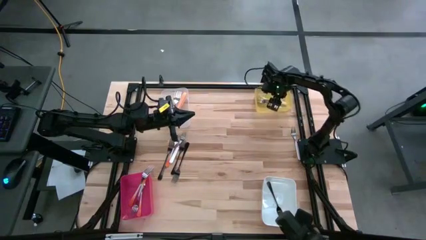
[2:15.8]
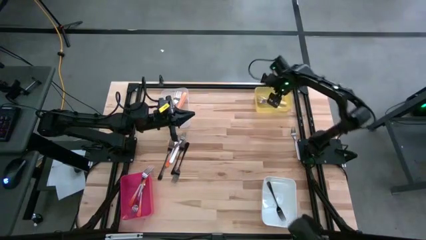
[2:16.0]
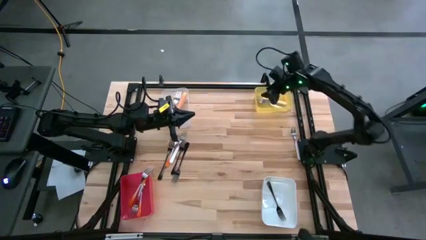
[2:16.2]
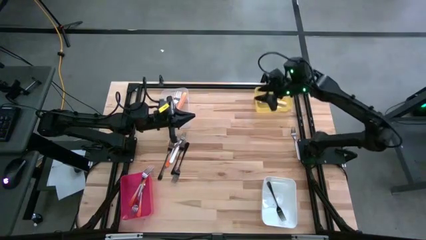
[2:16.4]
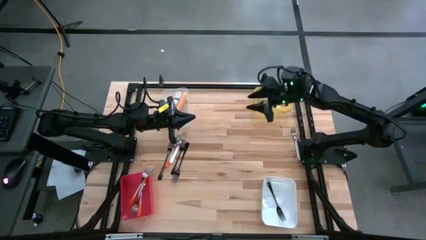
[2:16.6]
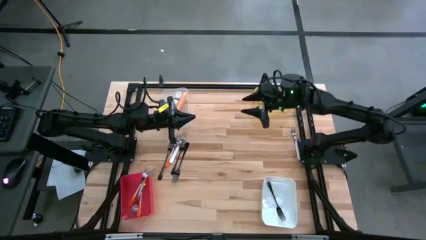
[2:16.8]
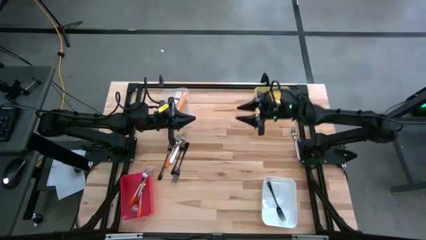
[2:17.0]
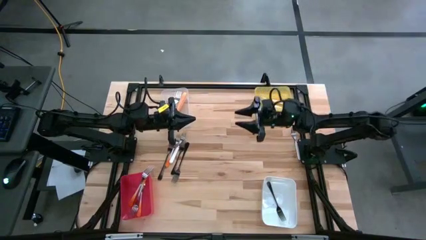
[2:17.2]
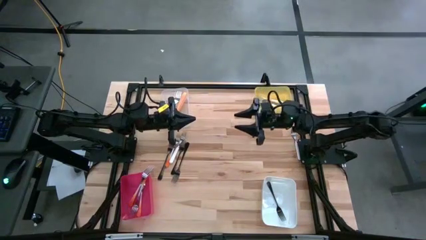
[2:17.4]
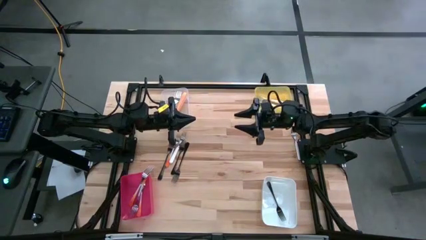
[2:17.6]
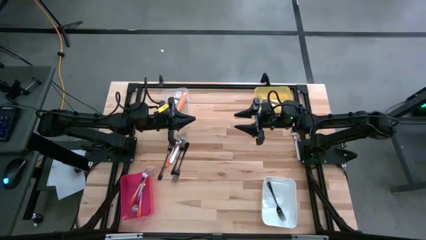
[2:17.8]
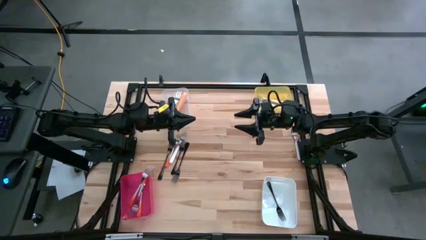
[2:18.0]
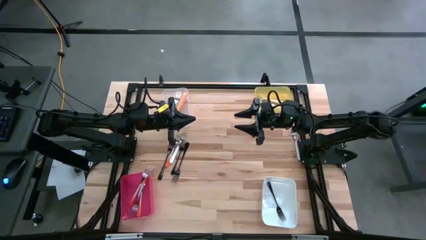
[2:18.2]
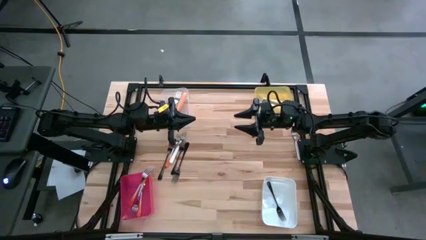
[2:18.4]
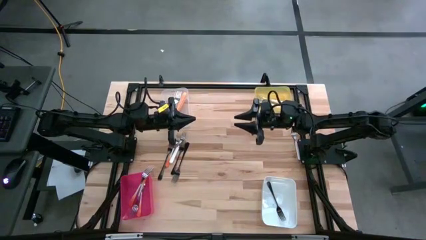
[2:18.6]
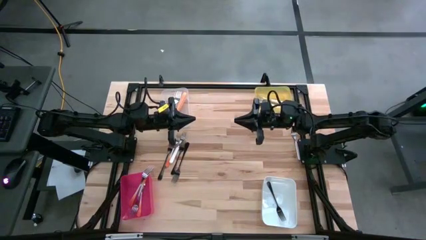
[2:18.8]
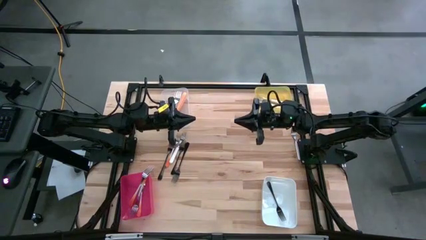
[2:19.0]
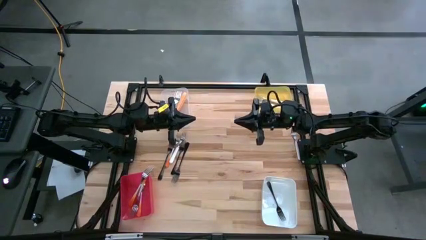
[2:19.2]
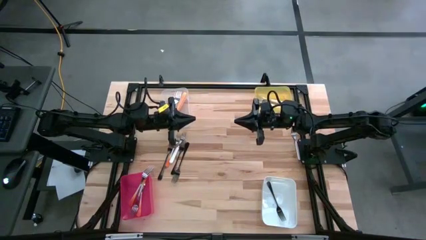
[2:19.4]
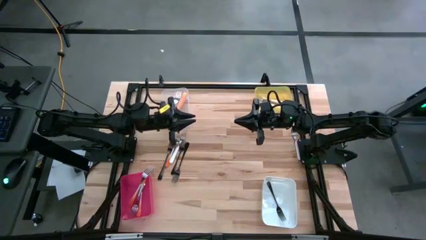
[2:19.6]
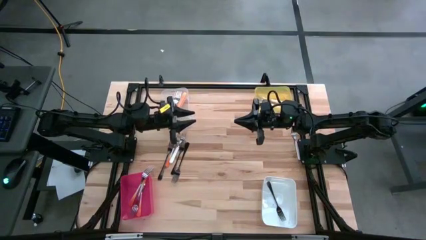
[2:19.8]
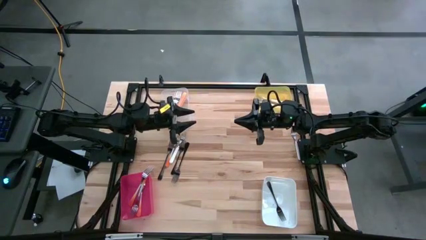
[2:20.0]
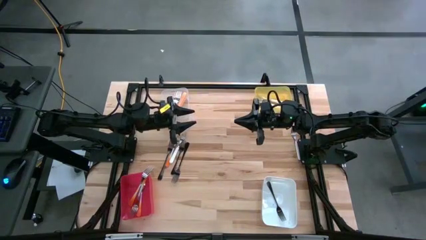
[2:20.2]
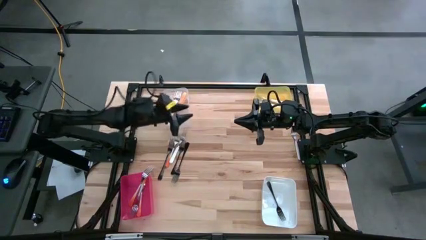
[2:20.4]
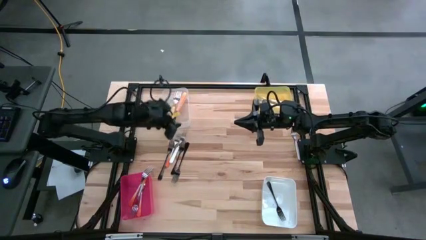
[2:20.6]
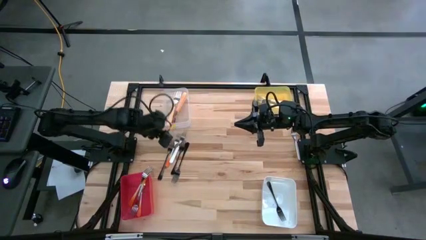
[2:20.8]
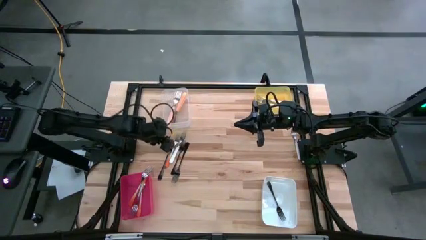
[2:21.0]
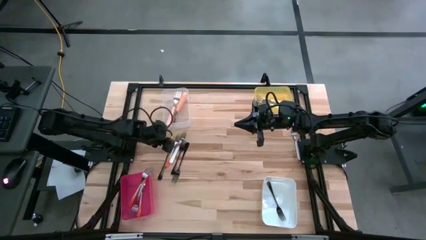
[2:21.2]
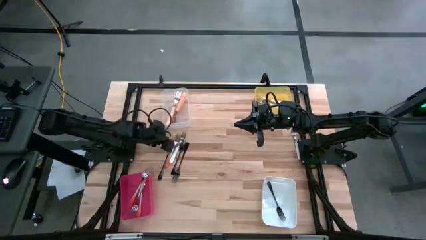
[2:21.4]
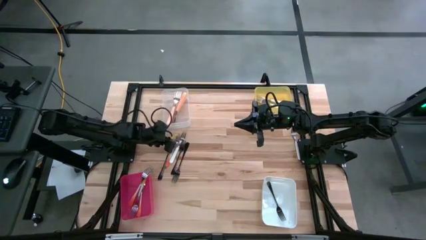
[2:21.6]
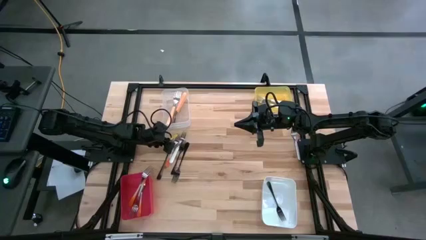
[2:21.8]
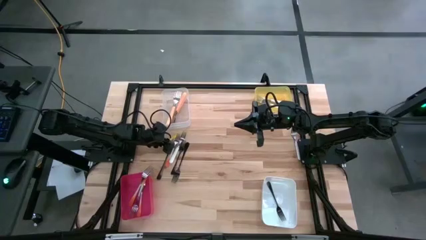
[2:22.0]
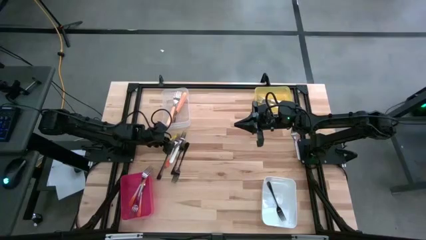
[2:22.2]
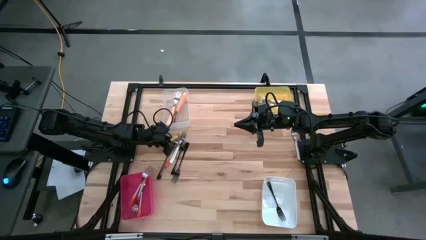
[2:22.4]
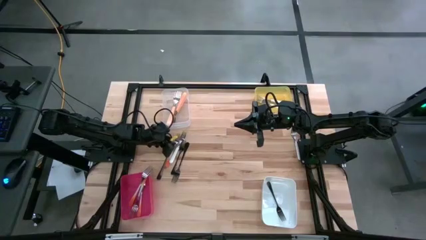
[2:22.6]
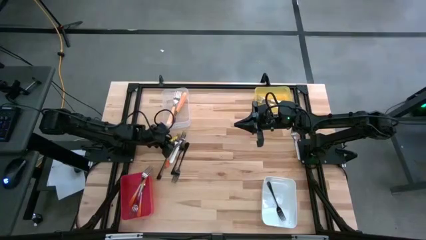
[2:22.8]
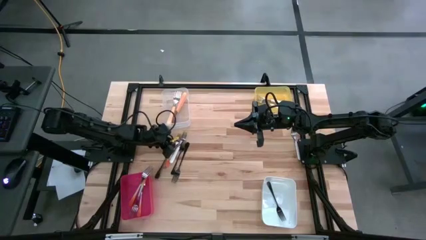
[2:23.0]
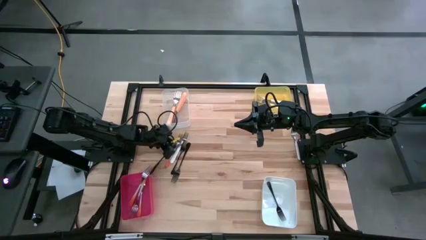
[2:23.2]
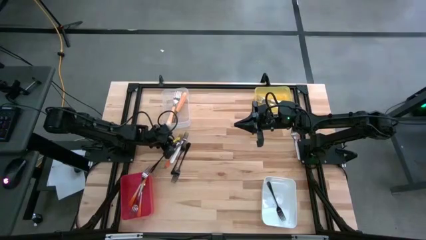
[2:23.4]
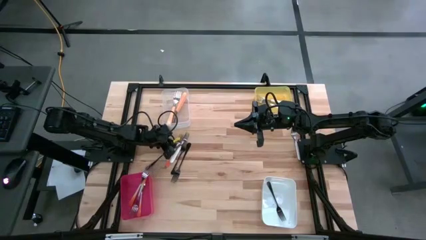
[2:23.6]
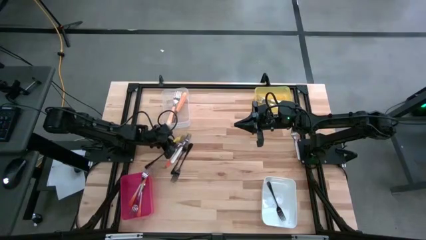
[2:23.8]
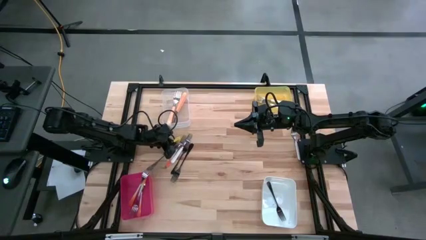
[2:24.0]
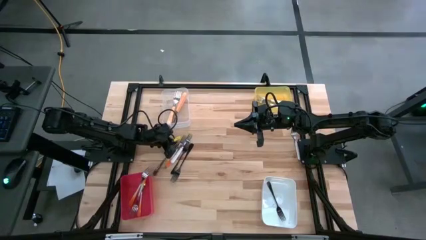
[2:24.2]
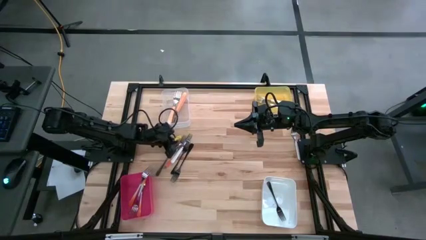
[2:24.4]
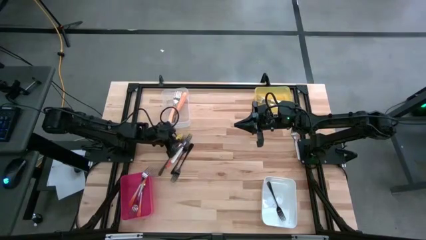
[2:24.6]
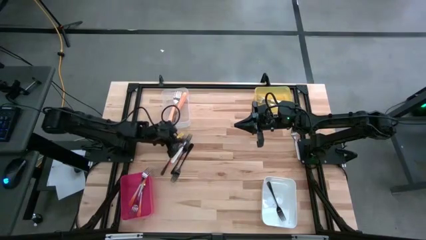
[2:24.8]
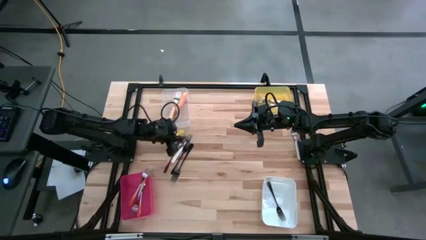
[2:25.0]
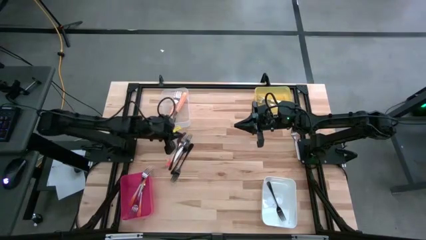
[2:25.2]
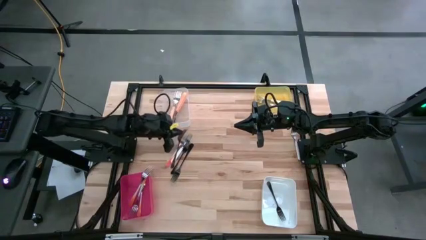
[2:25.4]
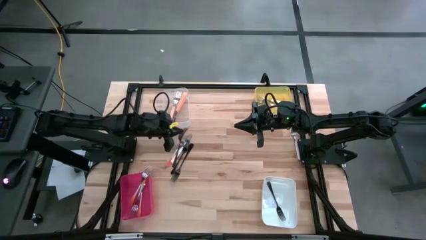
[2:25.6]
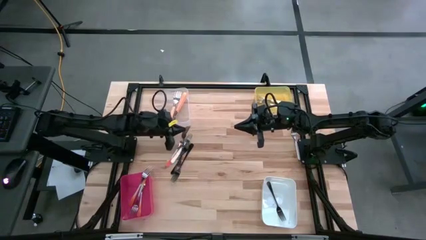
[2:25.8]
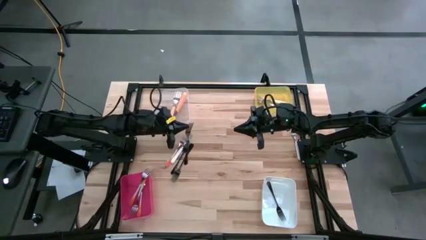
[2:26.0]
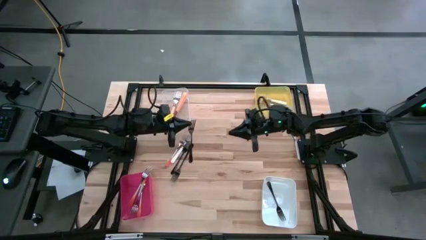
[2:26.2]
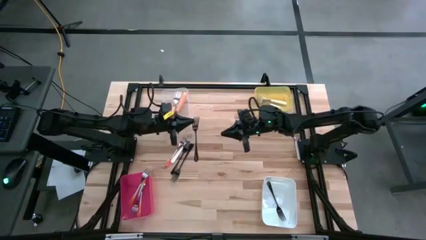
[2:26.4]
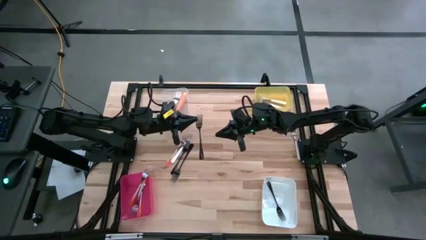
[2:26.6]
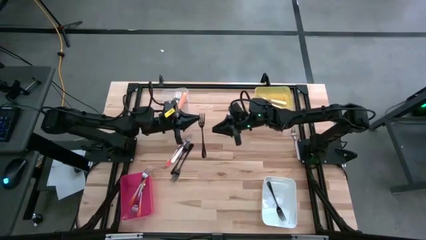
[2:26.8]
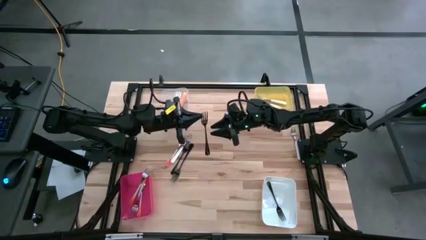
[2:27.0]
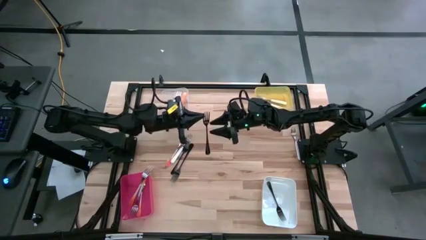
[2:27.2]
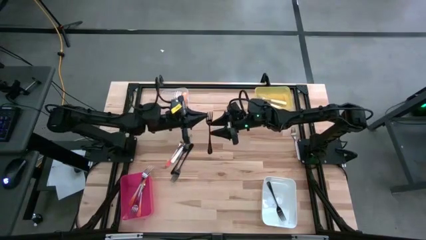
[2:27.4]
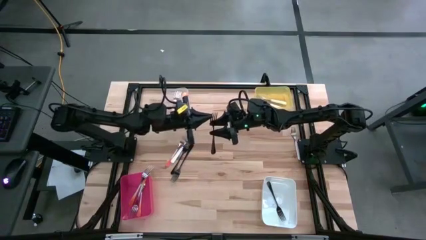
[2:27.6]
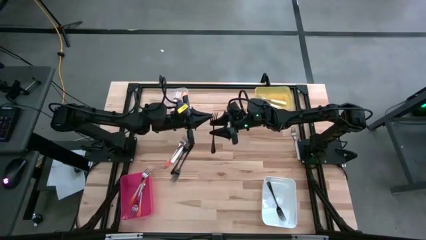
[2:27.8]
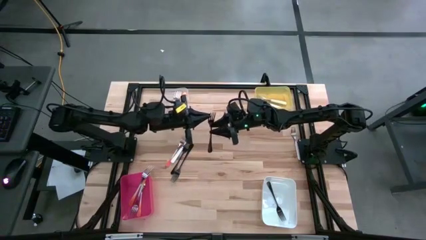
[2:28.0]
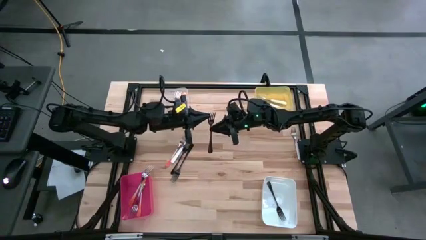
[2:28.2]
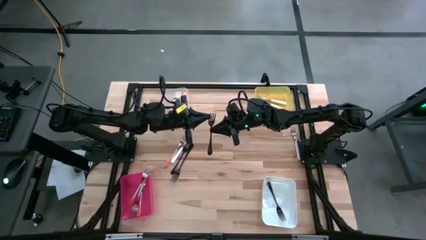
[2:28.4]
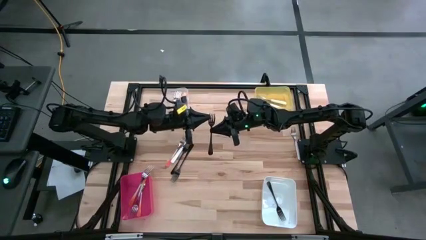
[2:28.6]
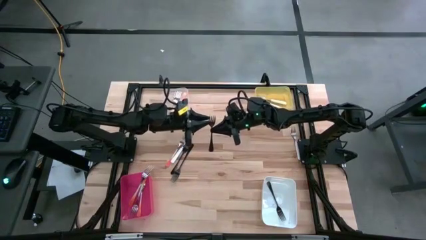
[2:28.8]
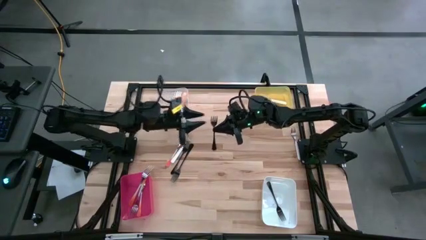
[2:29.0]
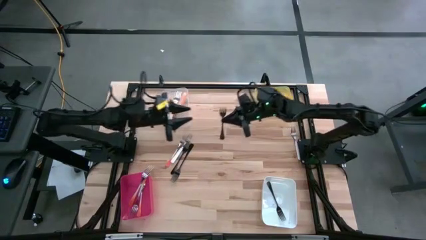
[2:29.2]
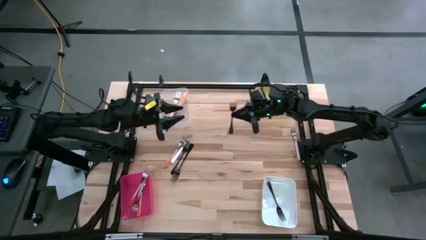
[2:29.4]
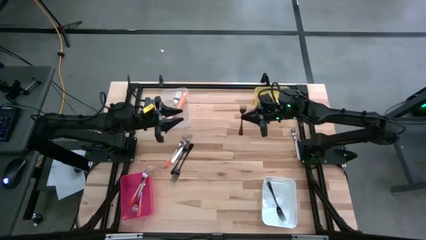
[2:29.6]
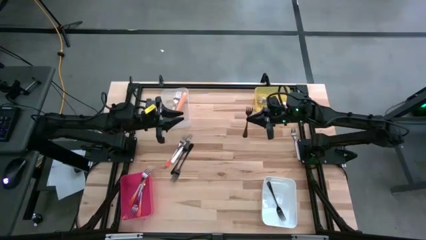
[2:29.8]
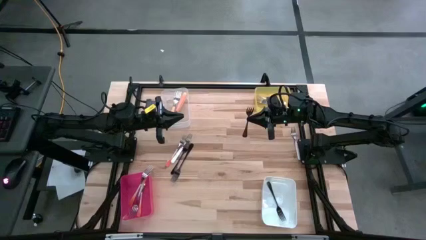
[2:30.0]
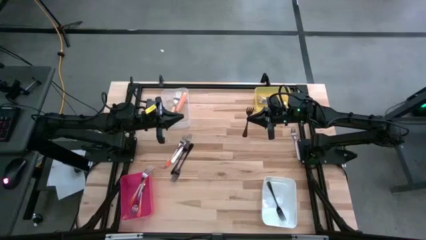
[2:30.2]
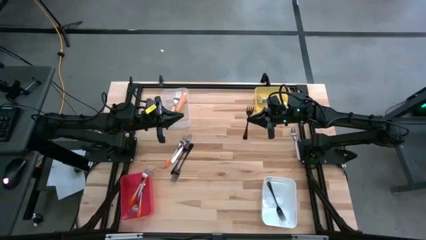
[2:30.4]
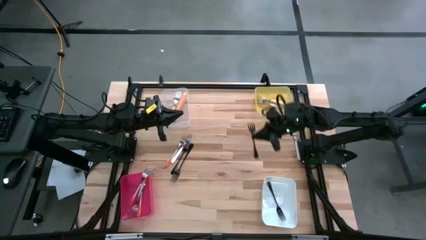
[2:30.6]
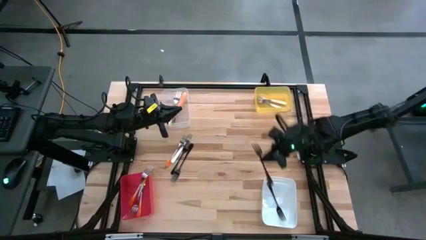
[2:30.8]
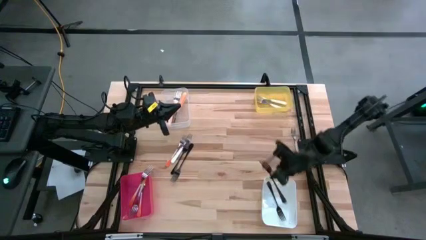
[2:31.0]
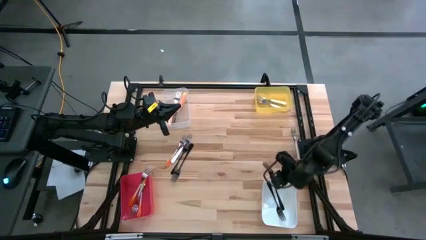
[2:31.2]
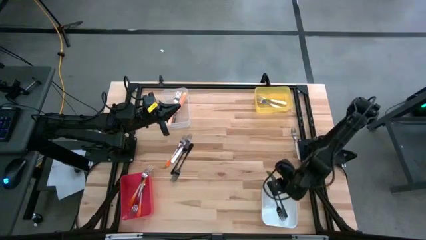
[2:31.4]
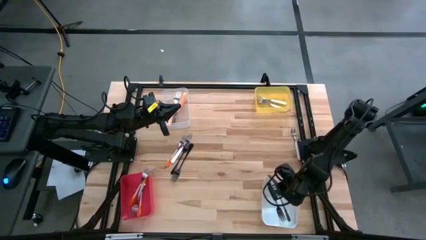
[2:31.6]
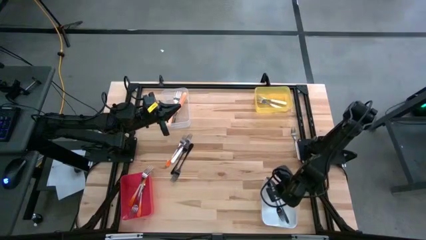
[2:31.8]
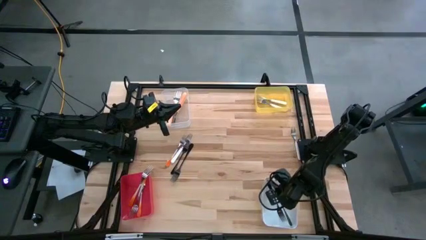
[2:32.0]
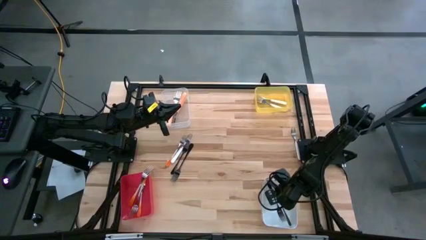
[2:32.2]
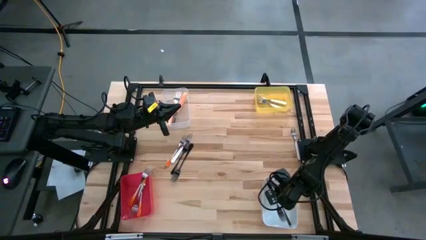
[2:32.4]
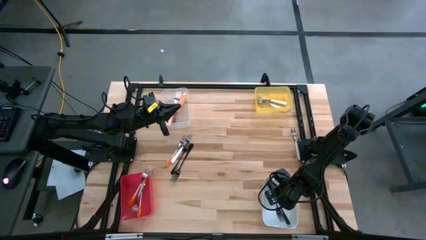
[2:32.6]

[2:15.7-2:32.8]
Task: Sort silverware by color (type)
Put the black fork into the white bin
